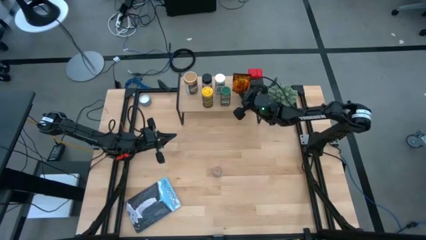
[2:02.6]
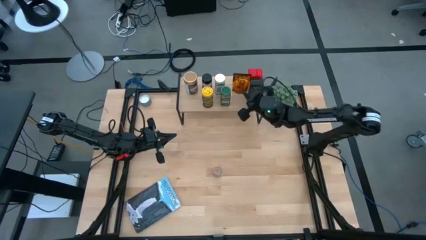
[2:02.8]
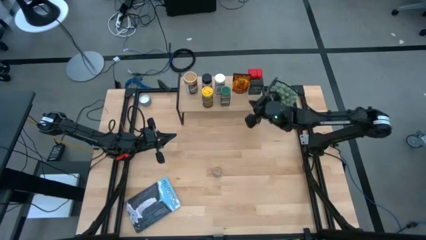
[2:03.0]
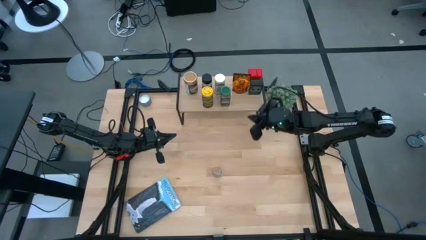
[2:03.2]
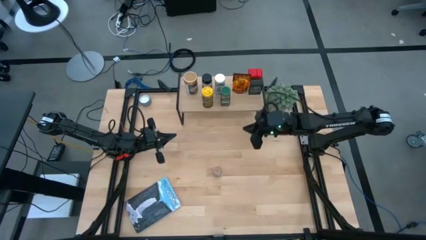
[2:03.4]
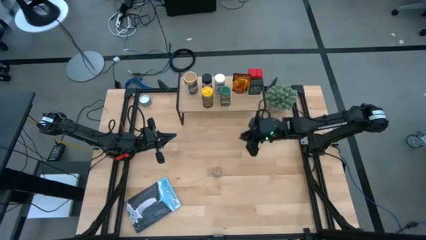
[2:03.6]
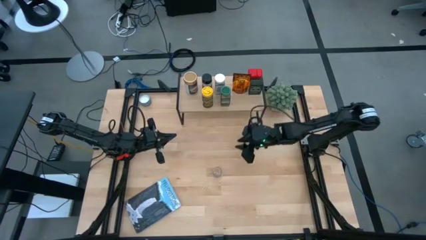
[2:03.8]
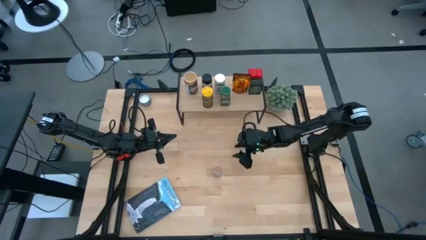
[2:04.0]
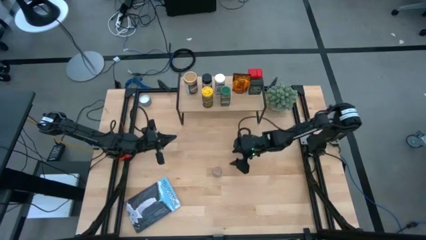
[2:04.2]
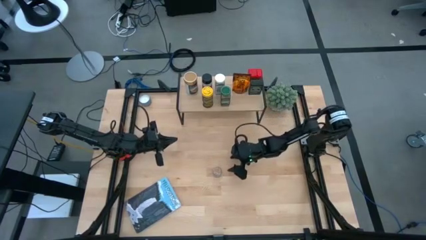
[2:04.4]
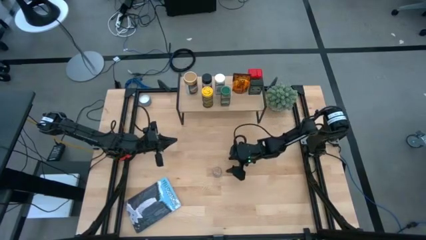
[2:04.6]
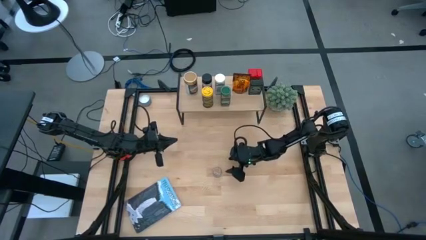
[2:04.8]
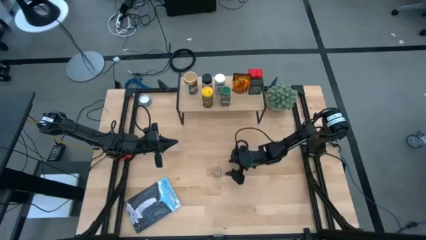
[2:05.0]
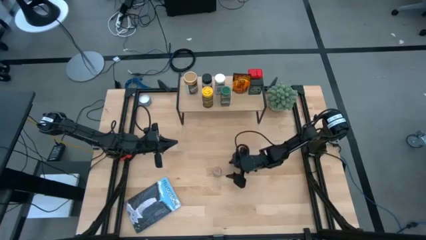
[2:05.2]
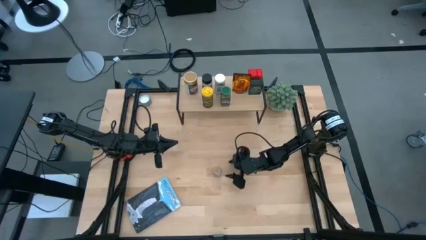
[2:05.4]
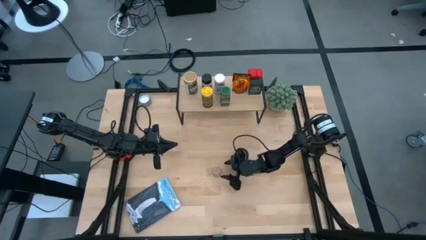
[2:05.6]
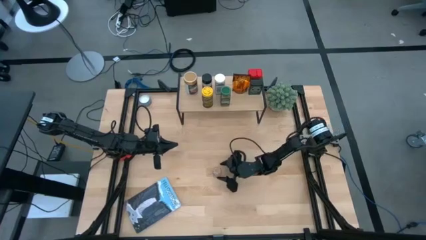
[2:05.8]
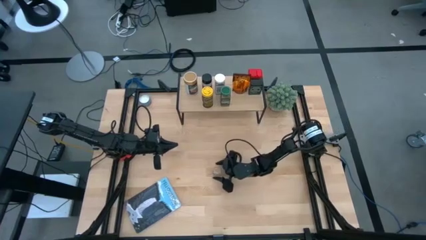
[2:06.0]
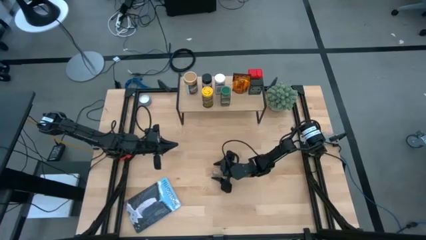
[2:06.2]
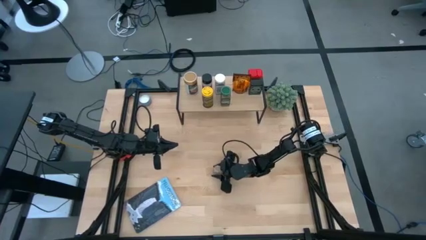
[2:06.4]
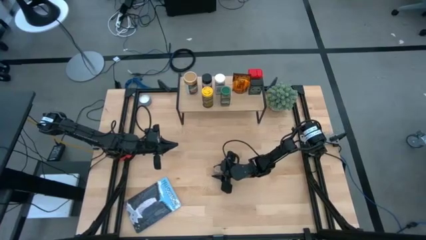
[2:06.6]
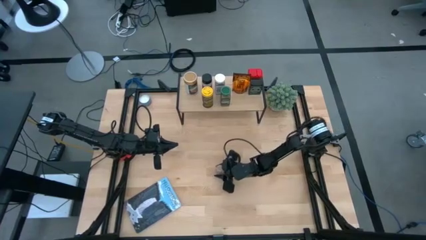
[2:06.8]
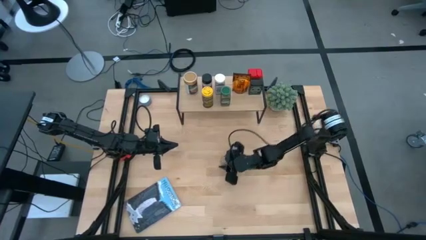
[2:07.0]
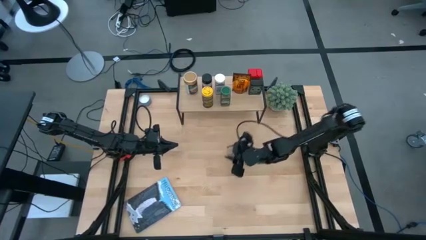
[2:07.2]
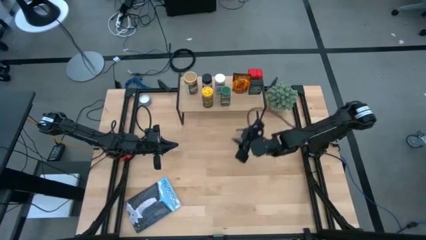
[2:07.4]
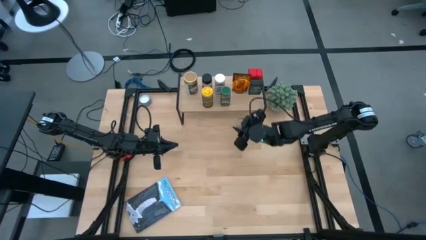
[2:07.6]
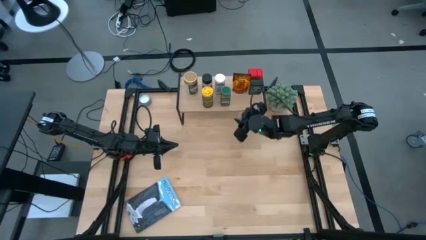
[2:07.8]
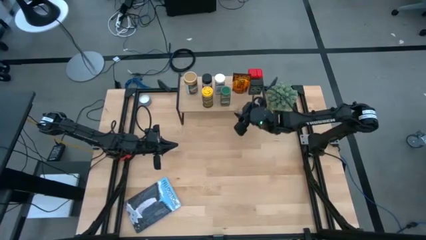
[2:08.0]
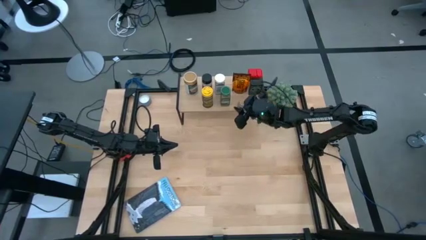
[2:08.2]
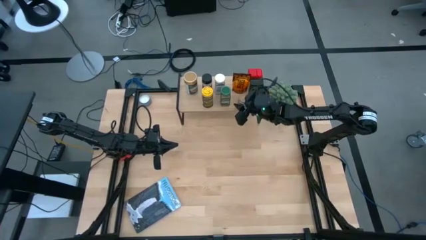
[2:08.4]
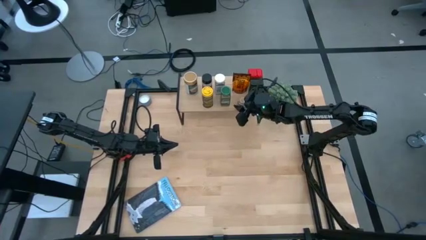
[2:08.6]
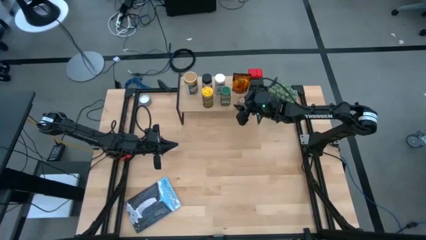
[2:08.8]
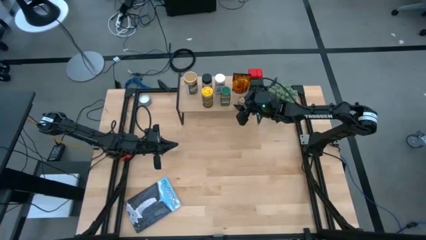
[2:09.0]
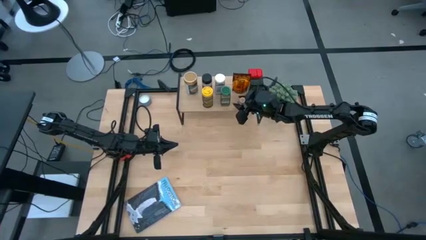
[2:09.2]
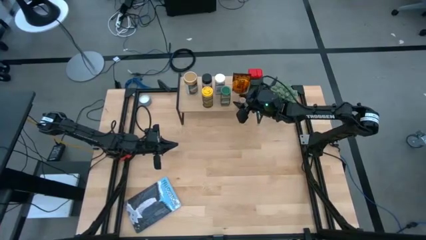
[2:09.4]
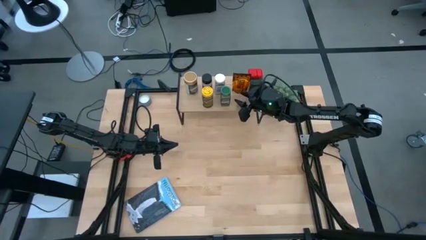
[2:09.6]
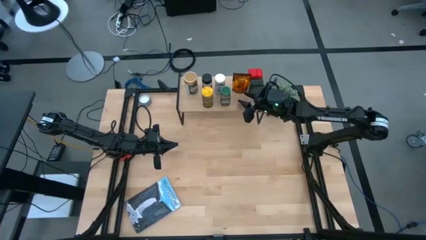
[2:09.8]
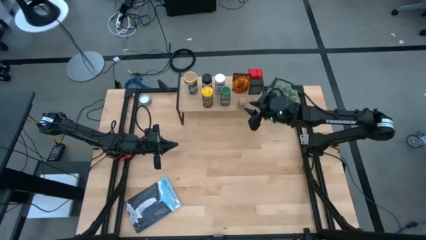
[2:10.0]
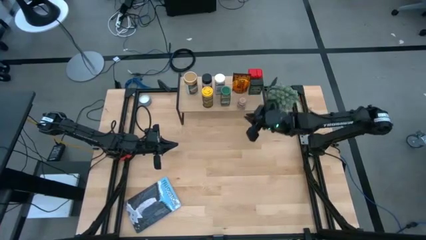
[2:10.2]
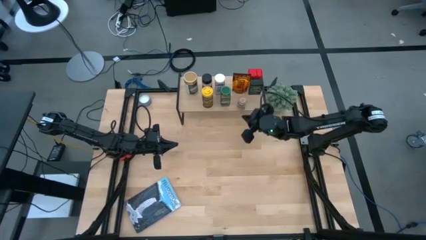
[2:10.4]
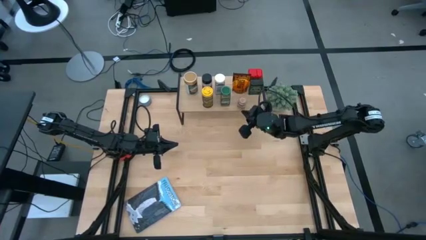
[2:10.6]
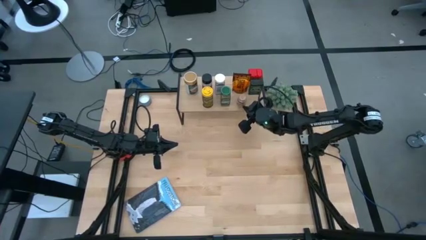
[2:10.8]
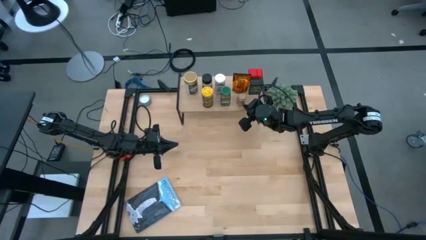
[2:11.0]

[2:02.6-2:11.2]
Task: Shelf spices
Put the brown seasoning bottle on the shelf

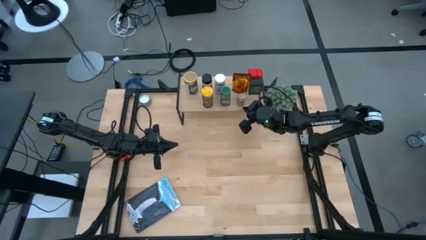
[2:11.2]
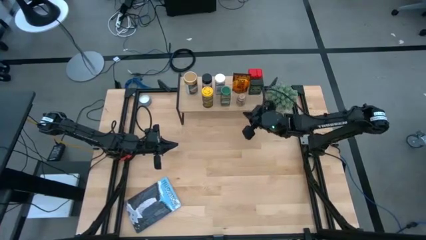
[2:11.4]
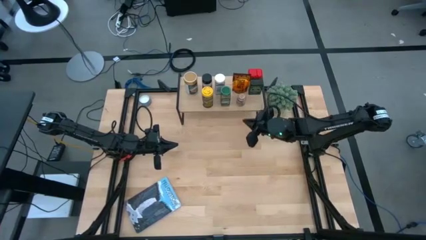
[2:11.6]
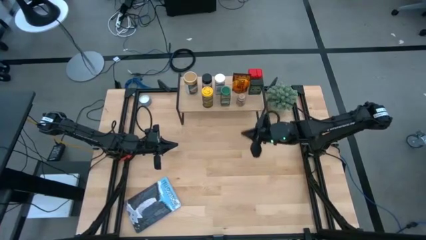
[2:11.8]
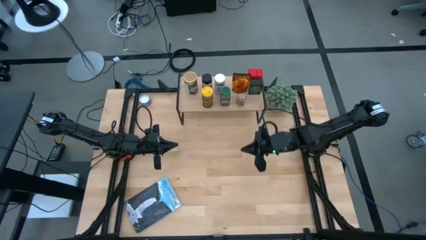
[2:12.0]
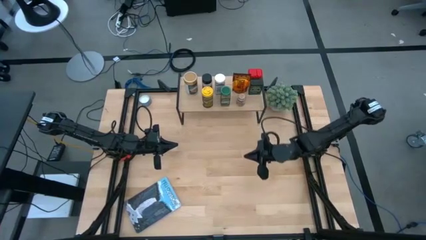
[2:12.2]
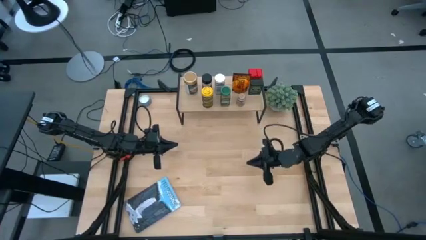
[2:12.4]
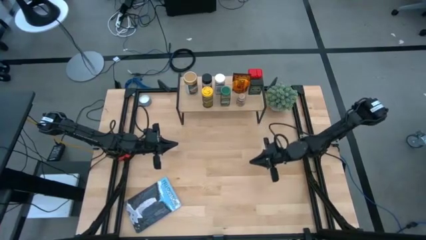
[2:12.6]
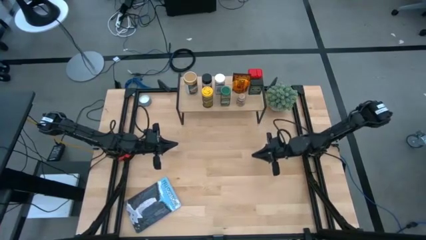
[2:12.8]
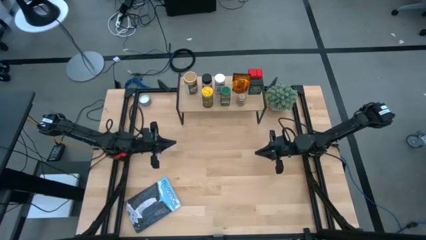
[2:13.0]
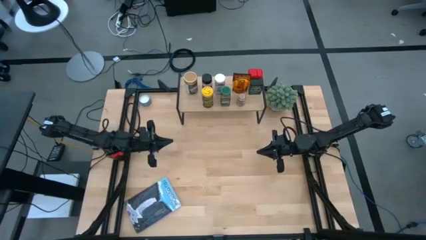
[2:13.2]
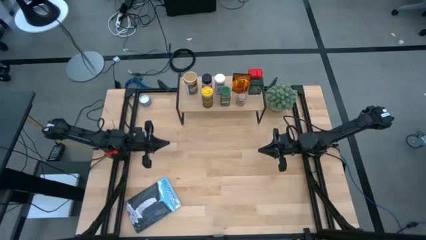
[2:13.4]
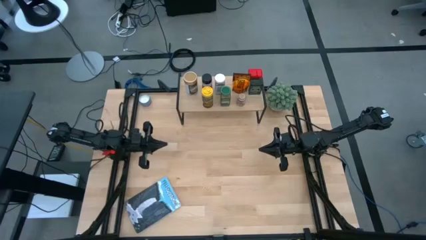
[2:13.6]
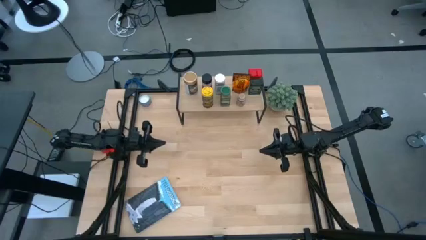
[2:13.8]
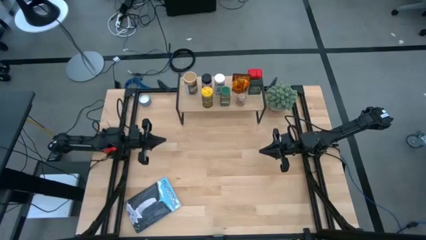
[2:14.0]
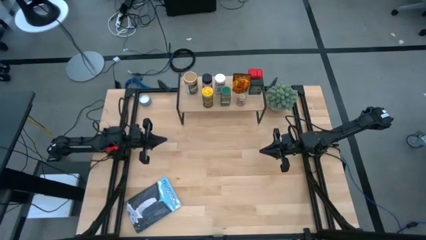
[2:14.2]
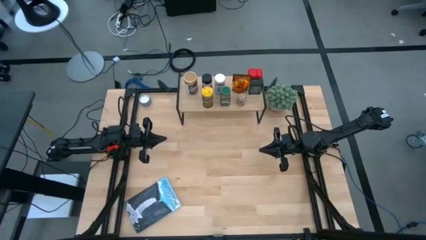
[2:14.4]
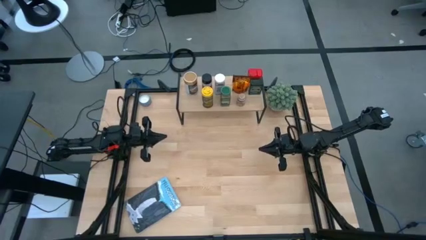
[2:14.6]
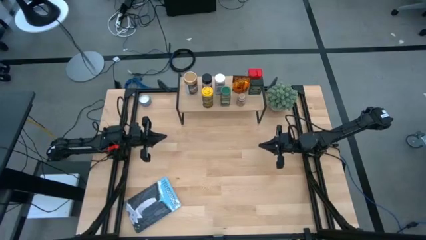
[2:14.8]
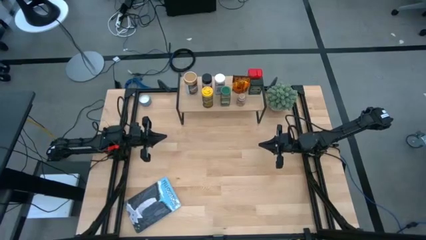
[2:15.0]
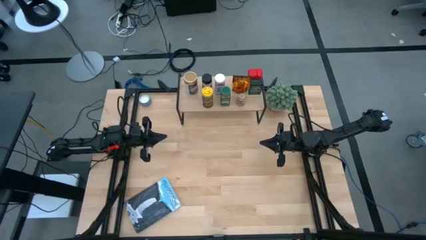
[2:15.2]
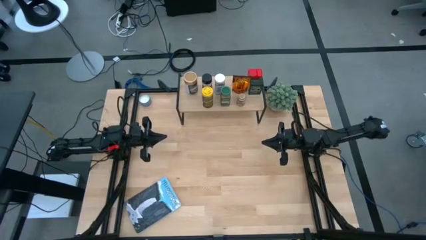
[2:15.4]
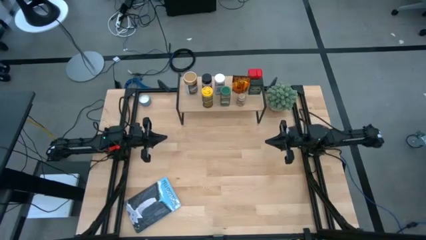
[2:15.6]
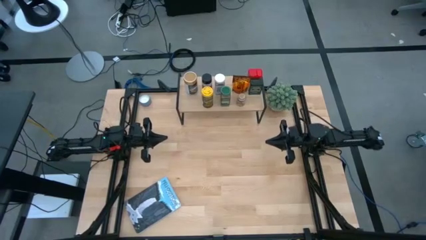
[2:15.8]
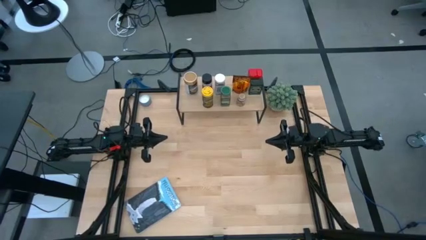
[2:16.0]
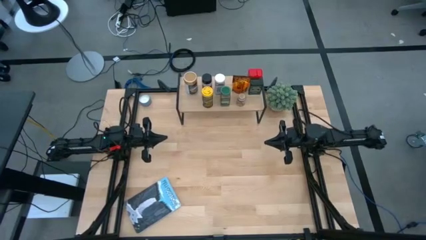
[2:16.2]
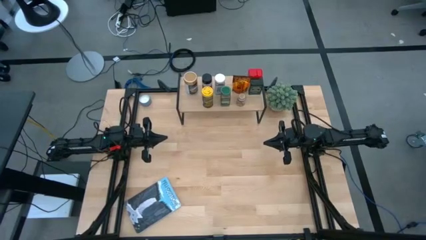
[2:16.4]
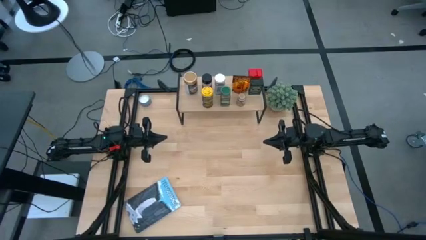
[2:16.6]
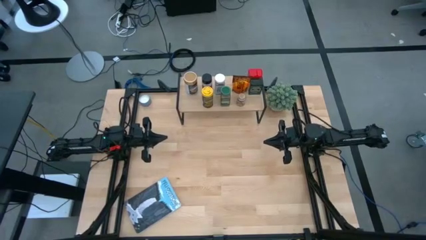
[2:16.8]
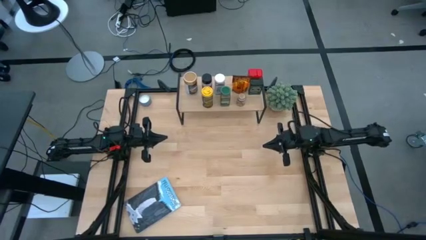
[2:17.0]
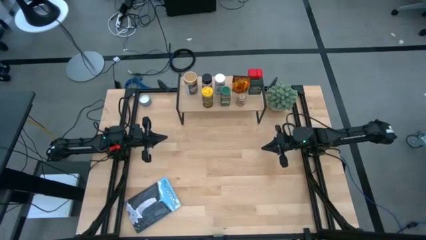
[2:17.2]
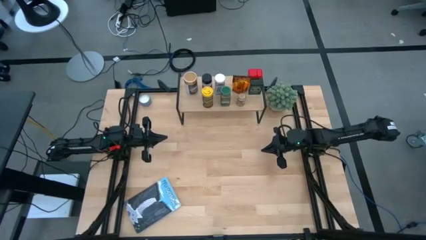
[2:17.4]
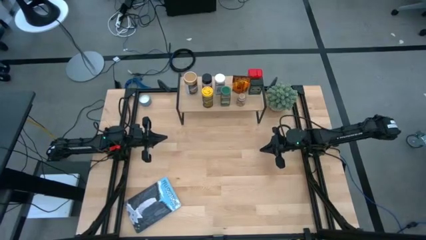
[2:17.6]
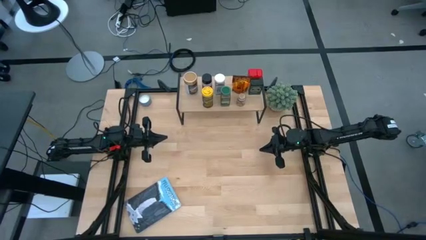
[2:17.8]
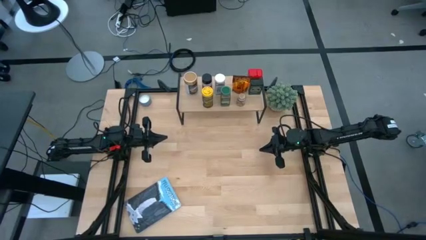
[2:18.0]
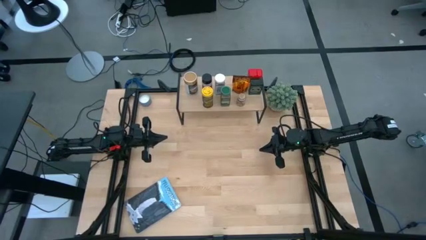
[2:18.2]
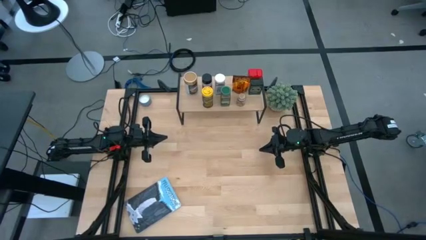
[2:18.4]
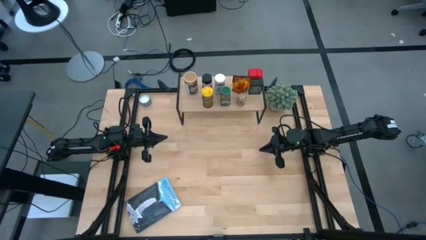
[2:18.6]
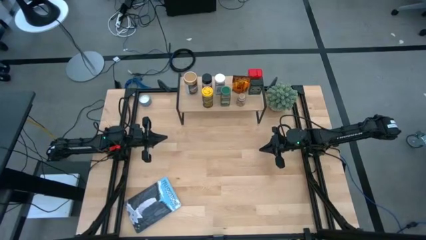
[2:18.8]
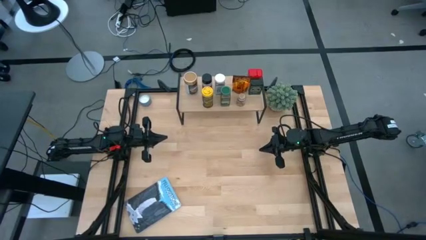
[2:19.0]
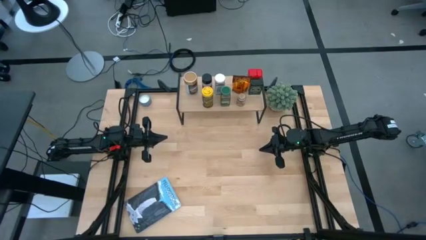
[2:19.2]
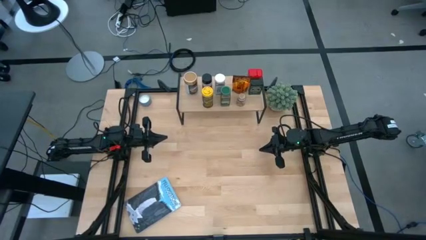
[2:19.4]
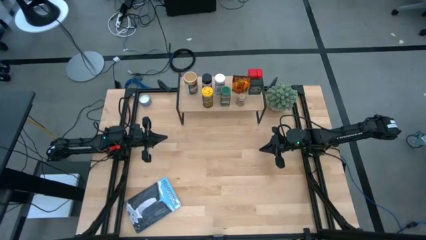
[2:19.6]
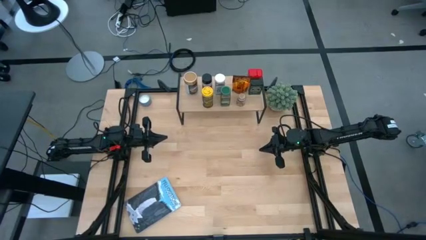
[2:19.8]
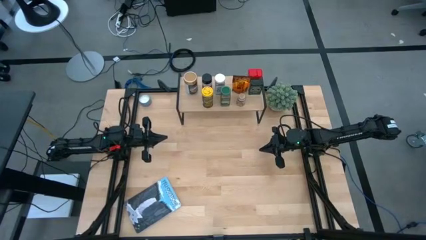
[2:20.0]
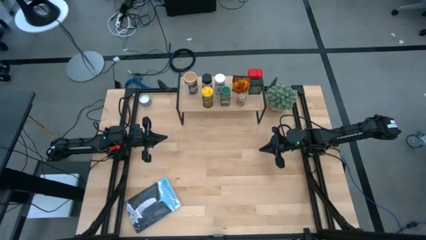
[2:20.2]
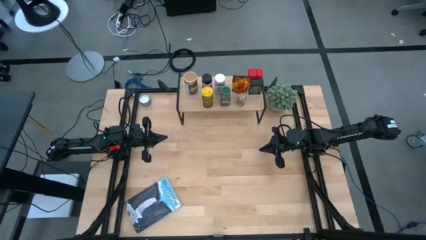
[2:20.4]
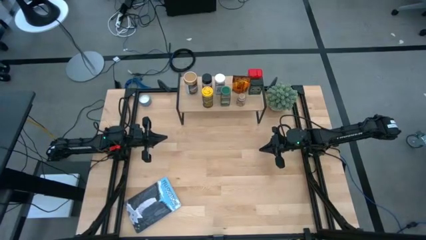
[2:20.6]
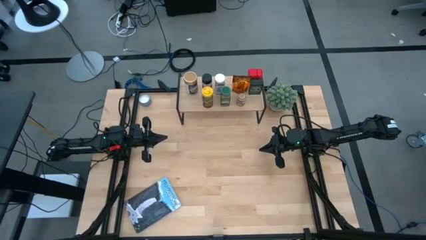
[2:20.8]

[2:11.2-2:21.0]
Return to Home Position
